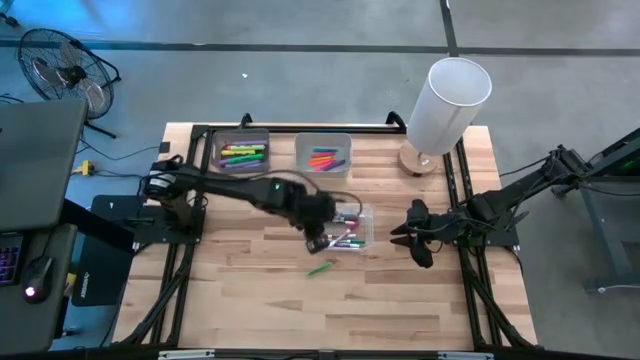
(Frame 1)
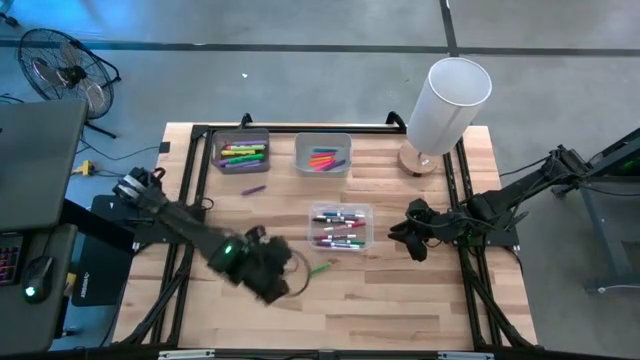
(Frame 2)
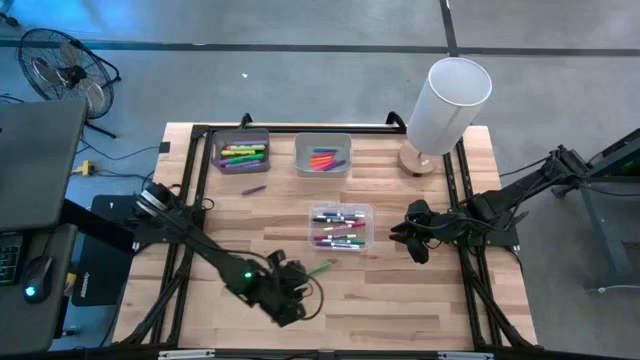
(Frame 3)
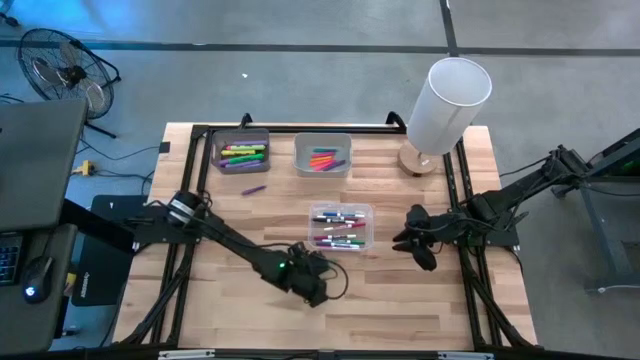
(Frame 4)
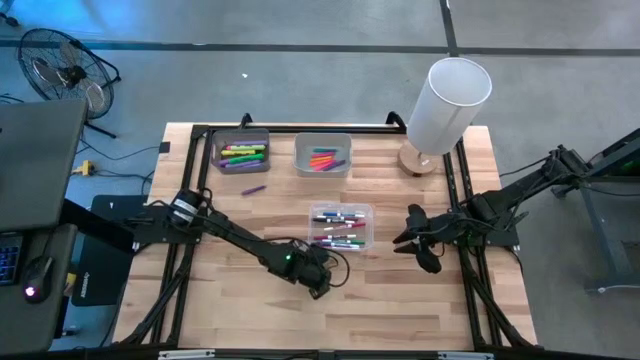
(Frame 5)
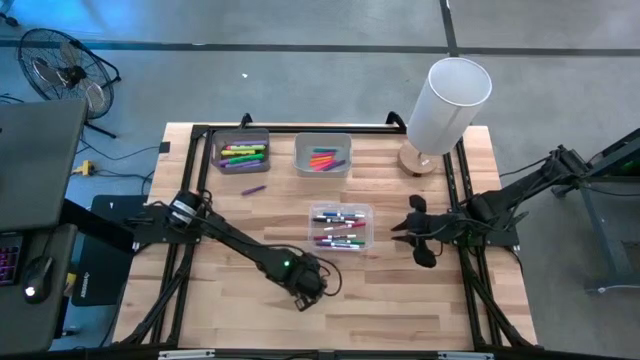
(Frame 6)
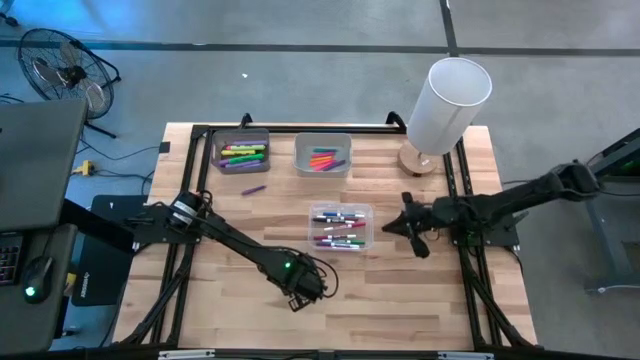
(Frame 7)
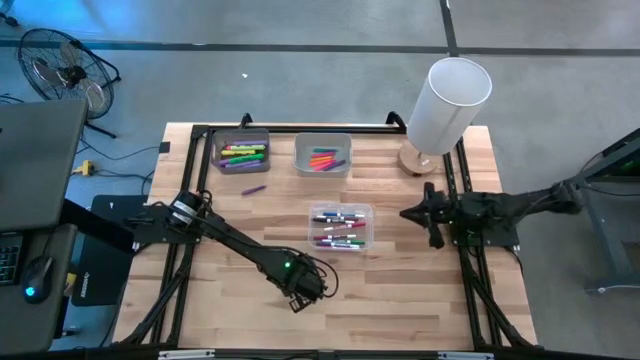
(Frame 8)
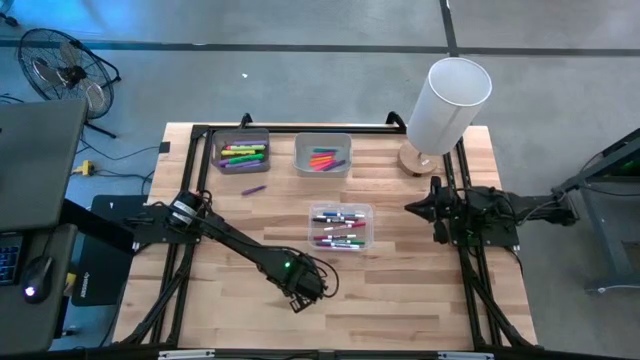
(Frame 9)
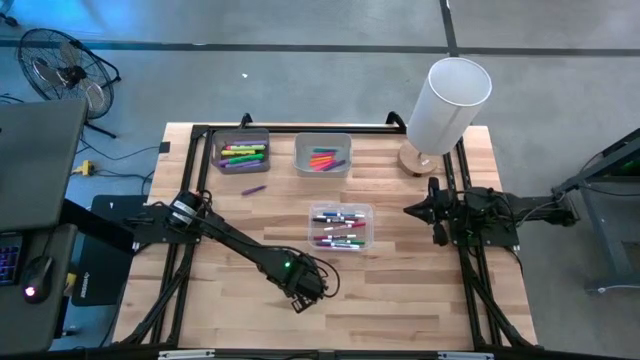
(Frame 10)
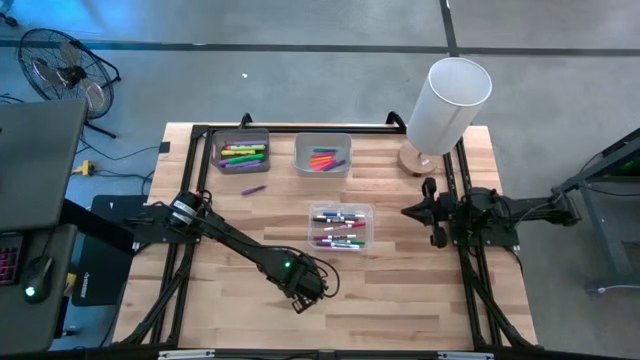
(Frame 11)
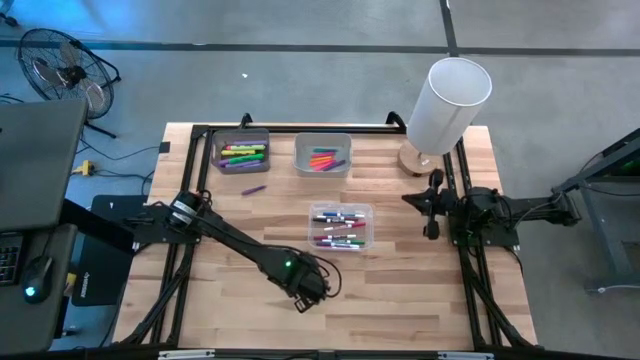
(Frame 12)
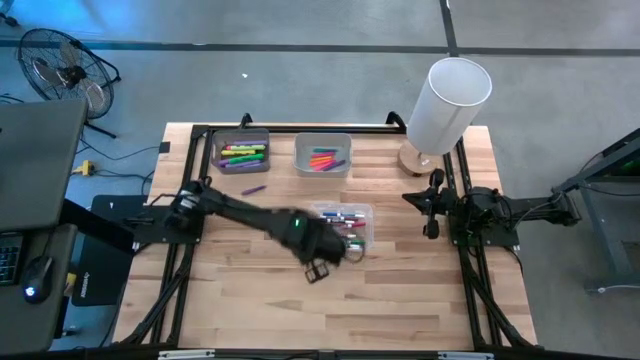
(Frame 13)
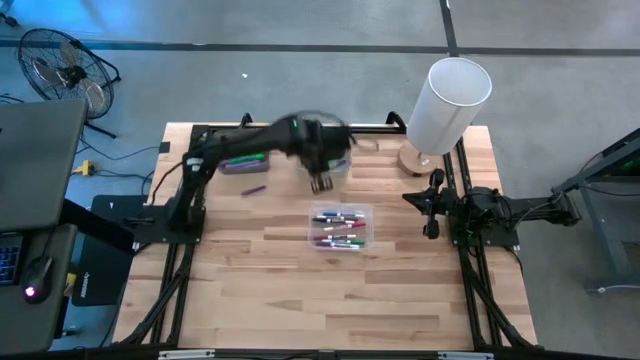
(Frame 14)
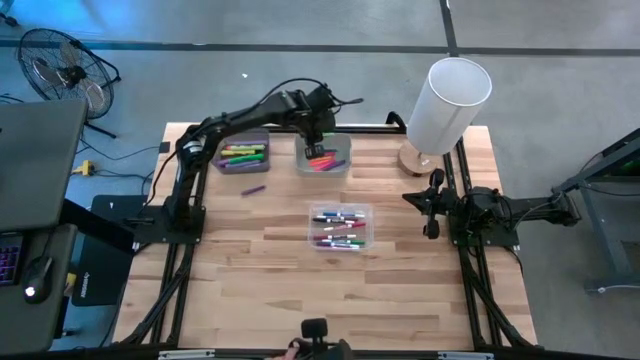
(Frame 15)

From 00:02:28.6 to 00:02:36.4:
Task: Pick & Place Markers
Put the green pen into the gray bin

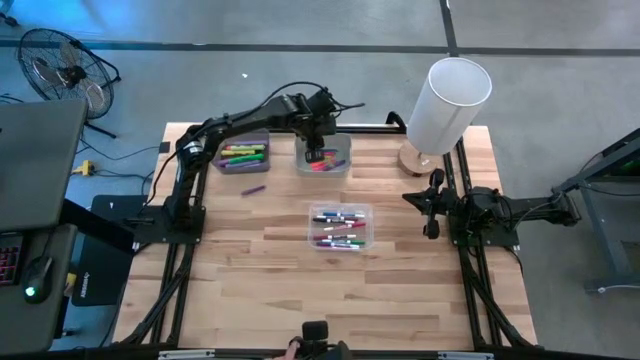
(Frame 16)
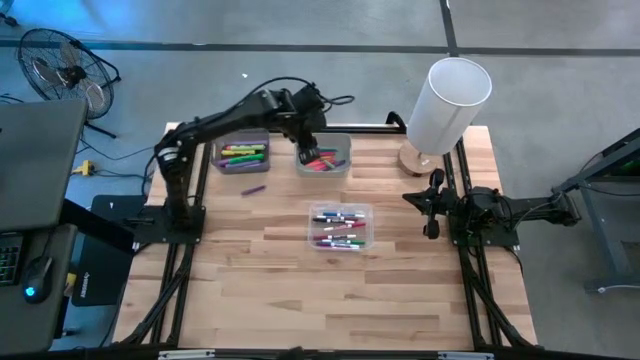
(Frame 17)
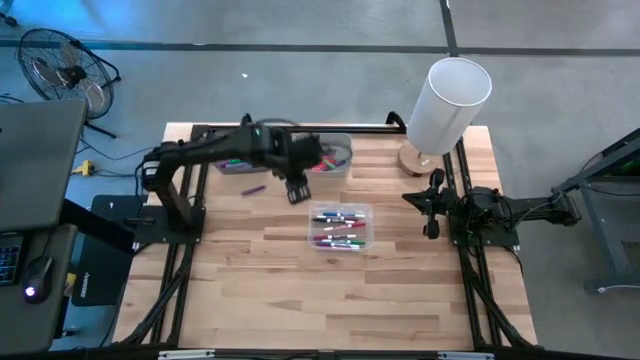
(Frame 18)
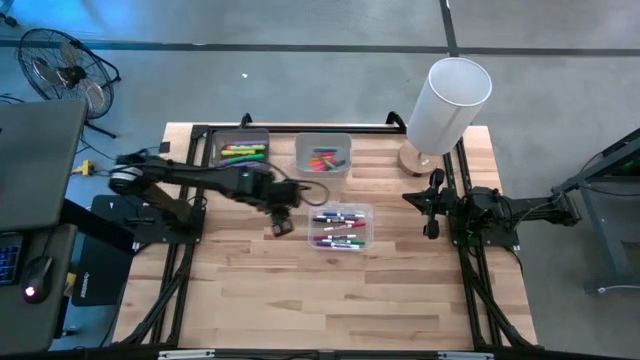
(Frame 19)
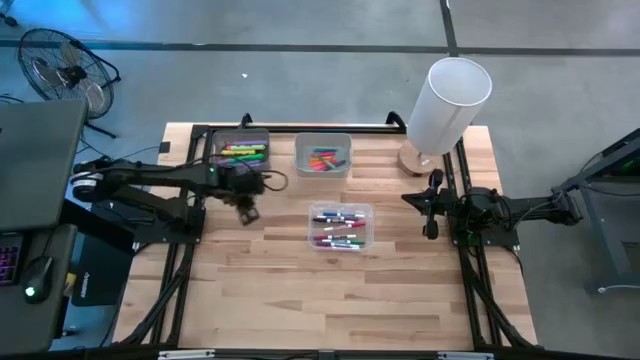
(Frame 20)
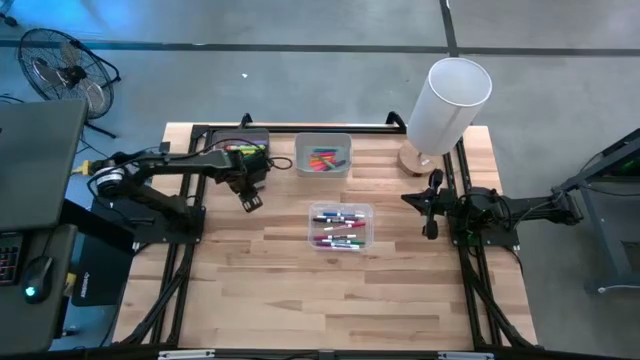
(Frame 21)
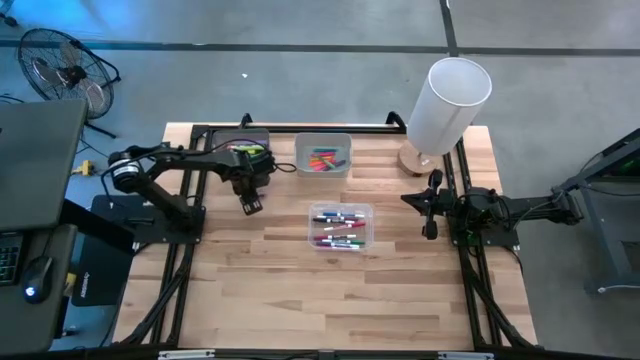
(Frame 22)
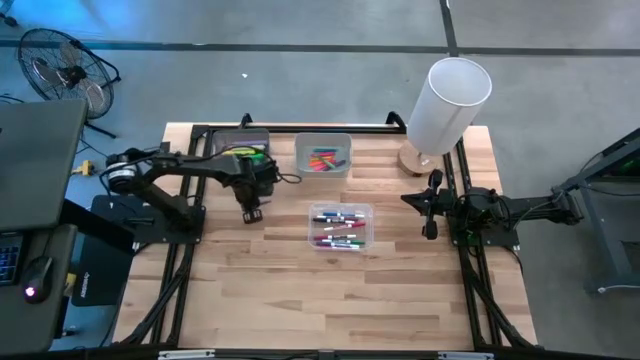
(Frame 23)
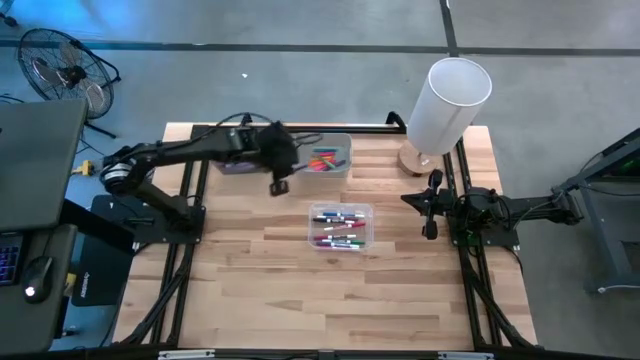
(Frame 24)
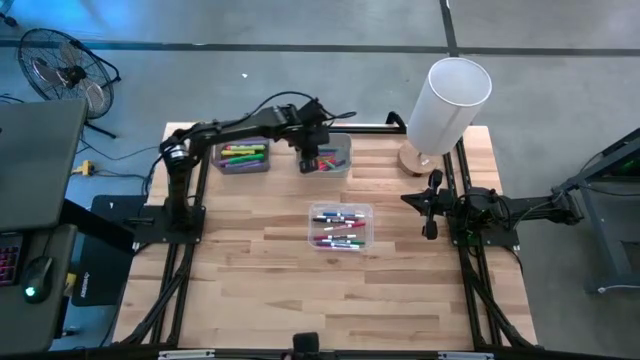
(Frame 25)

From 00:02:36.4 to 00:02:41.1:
Put the purple pen into the gray bin

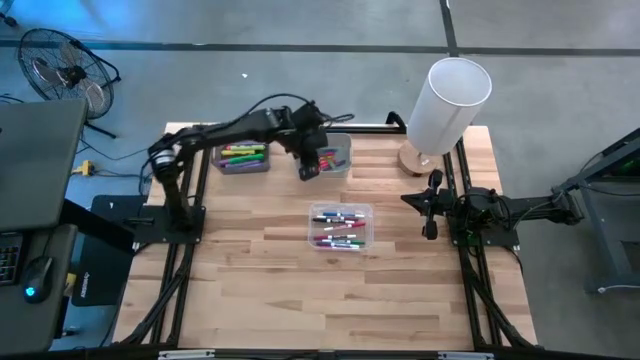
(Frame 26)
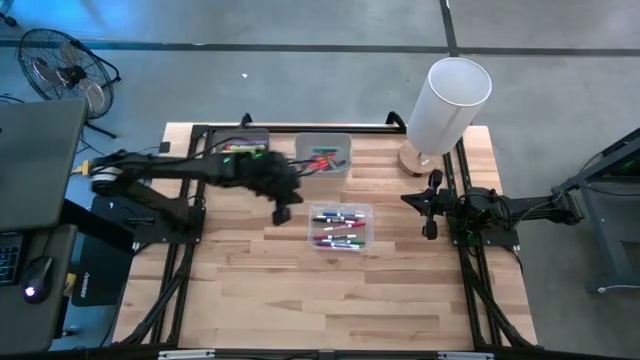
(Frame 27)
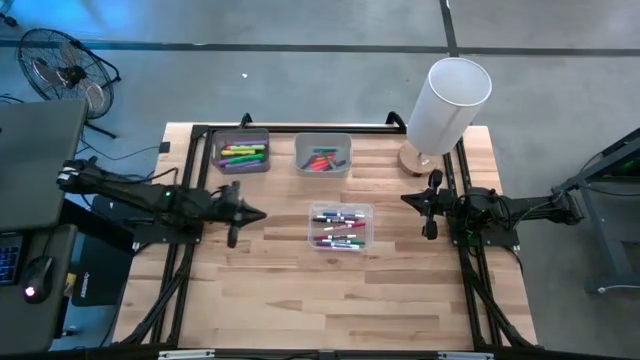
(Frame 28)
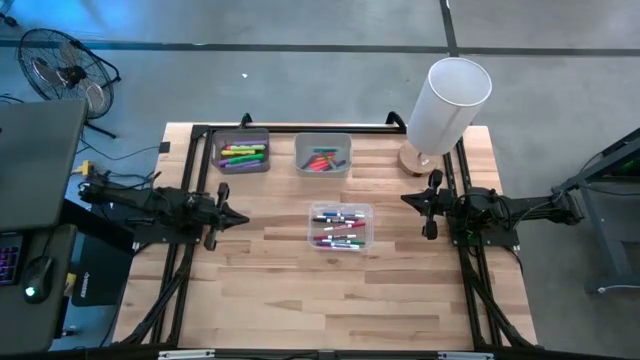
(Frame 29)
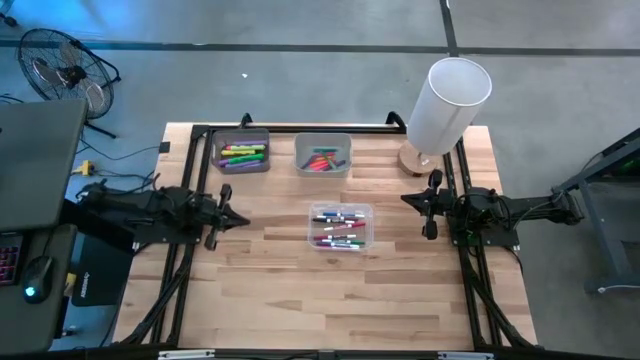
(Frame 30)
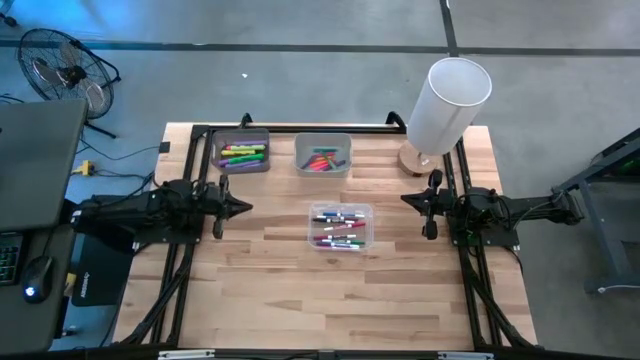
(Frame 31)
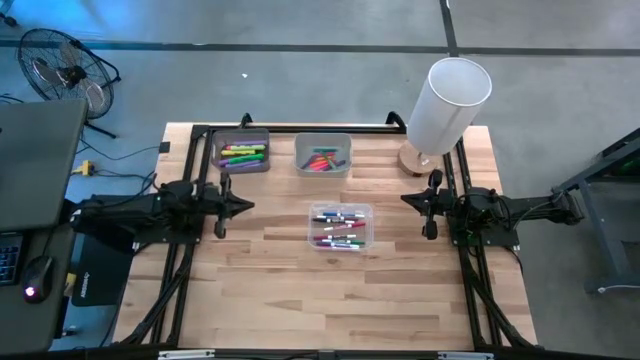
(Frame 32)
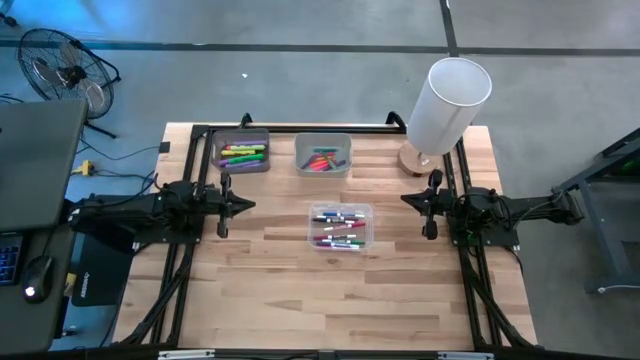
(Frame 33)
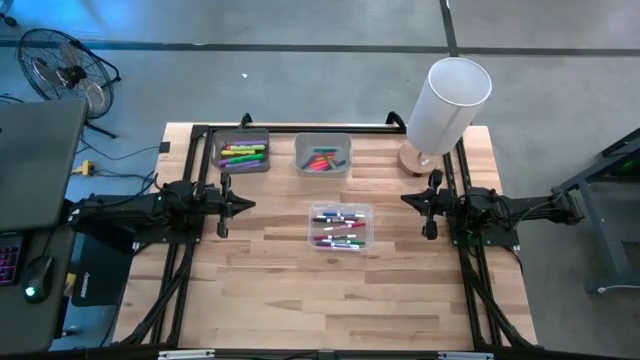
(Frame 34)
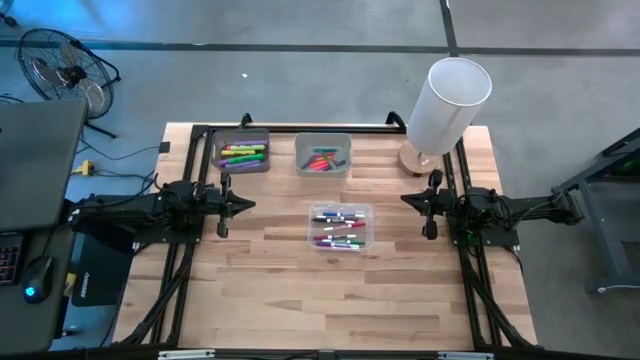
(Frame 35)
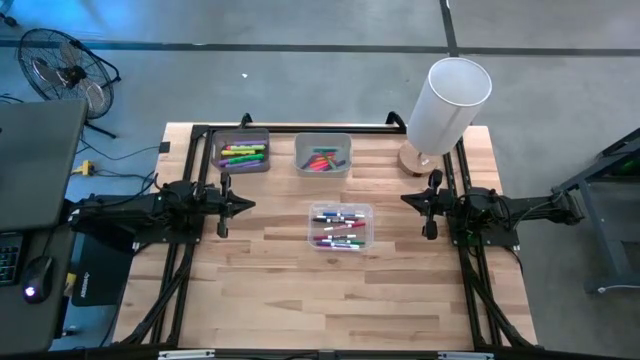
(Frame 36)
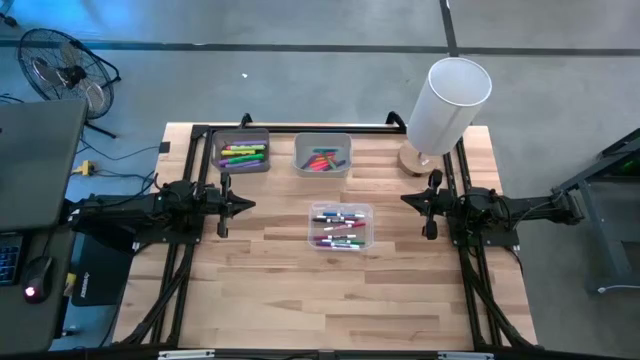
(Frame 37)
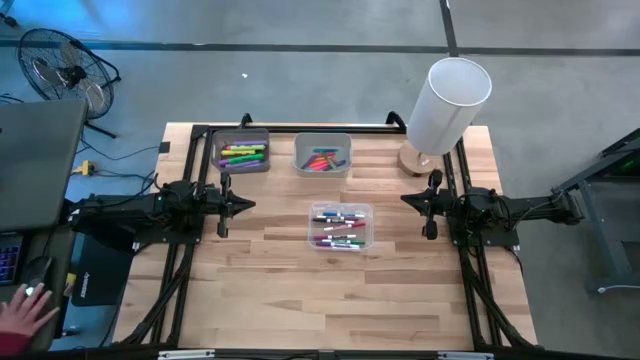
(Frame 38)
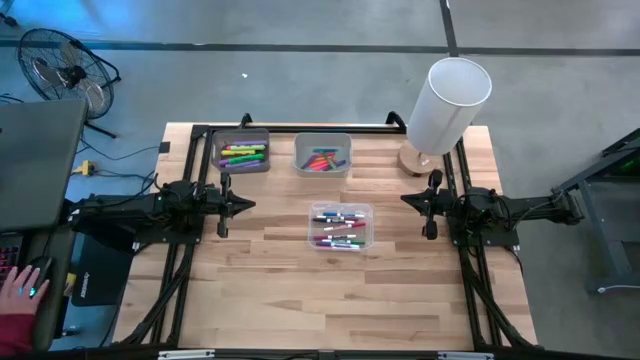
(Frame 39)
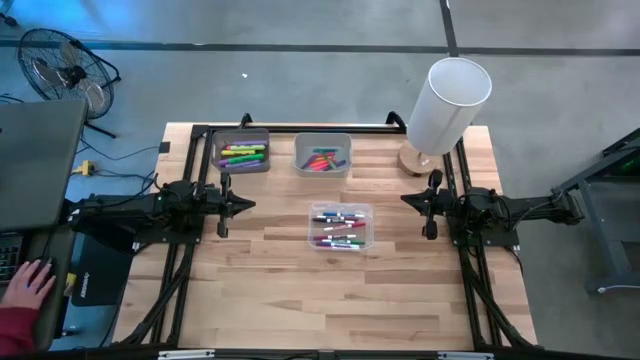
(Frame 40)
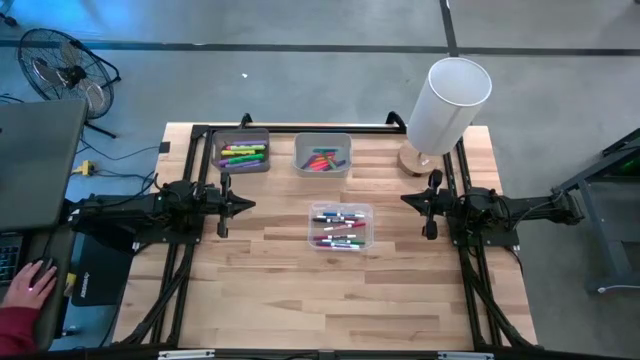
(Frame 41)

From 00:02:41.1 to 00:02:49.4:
Return to Home Position
